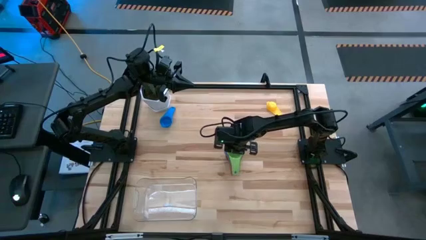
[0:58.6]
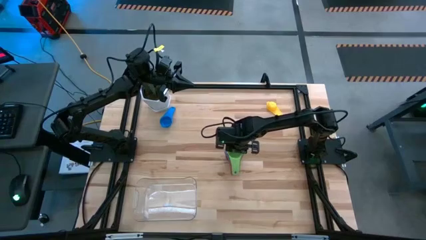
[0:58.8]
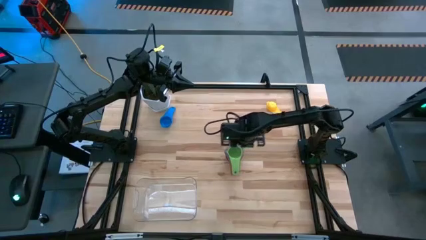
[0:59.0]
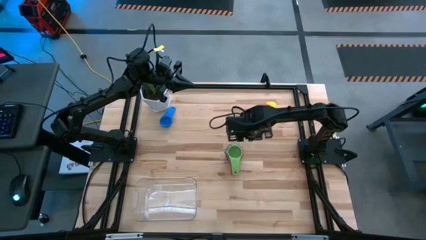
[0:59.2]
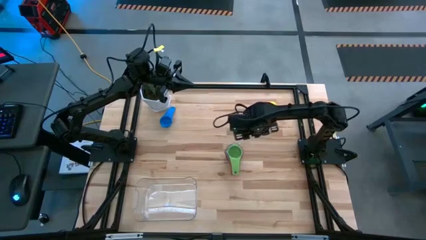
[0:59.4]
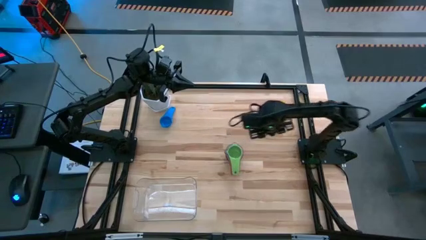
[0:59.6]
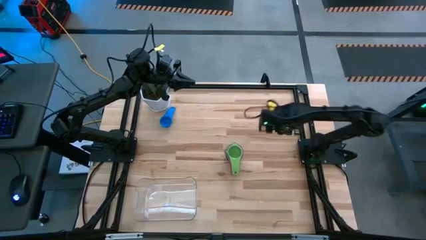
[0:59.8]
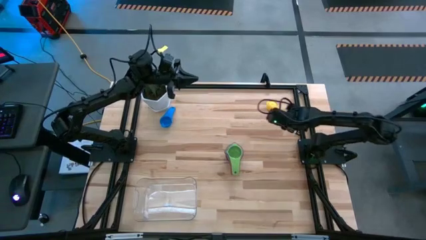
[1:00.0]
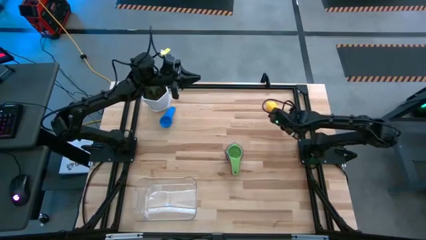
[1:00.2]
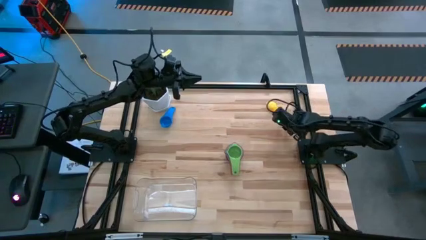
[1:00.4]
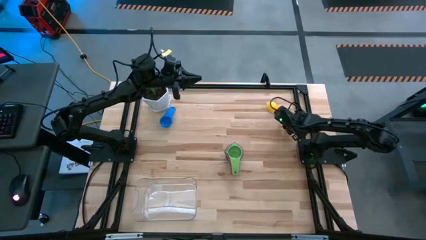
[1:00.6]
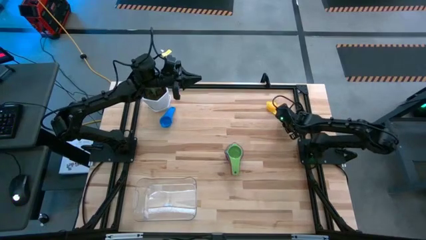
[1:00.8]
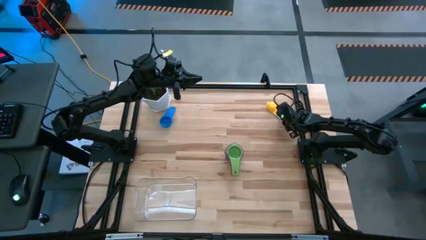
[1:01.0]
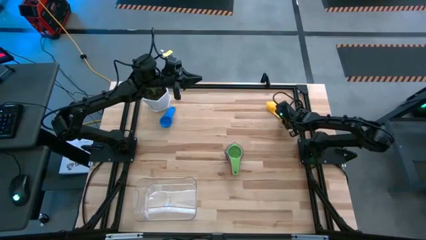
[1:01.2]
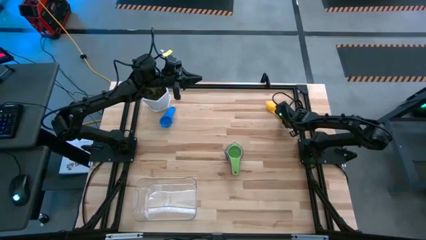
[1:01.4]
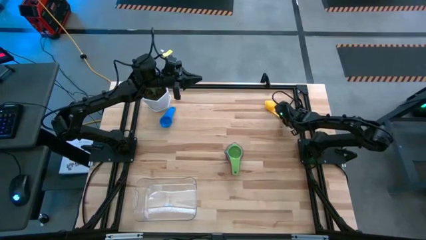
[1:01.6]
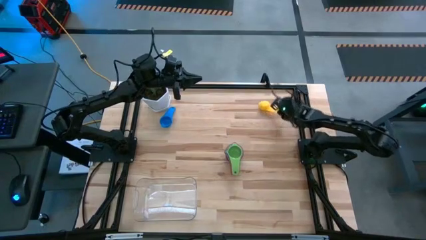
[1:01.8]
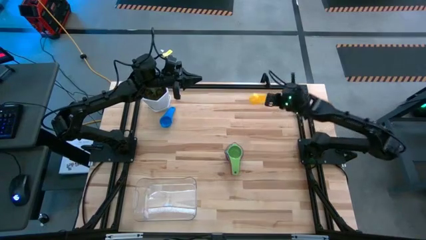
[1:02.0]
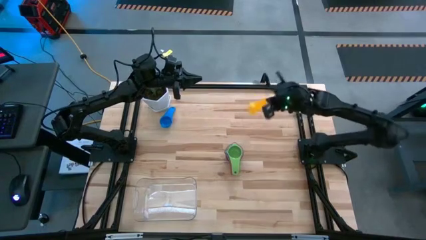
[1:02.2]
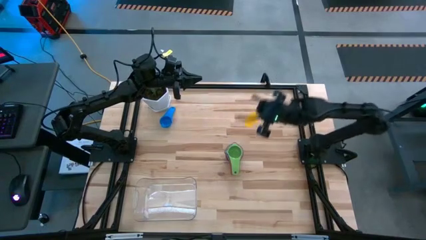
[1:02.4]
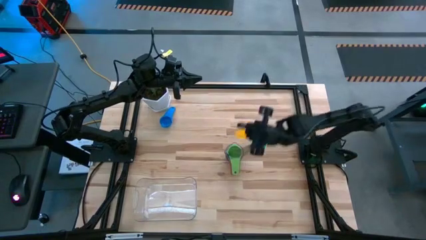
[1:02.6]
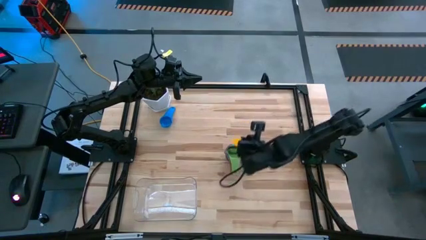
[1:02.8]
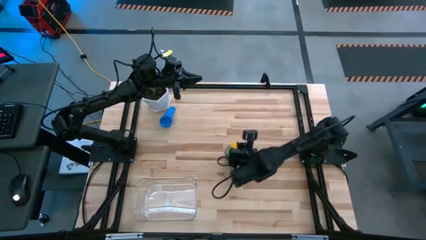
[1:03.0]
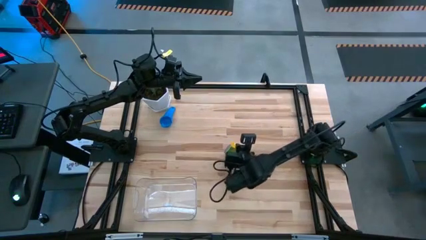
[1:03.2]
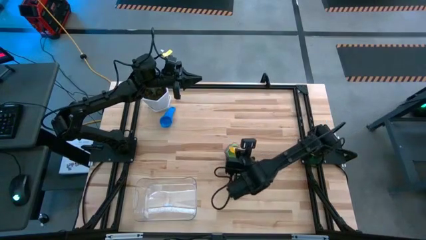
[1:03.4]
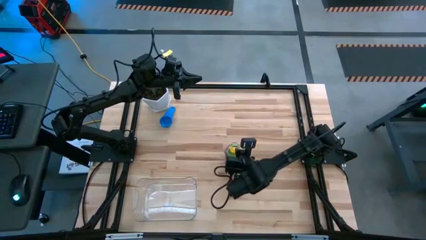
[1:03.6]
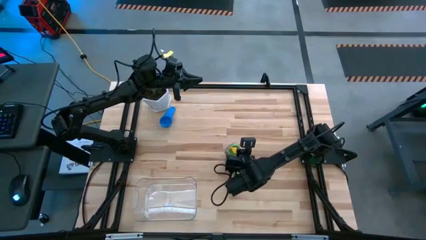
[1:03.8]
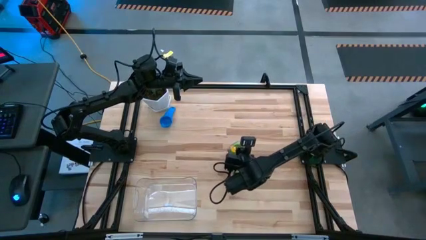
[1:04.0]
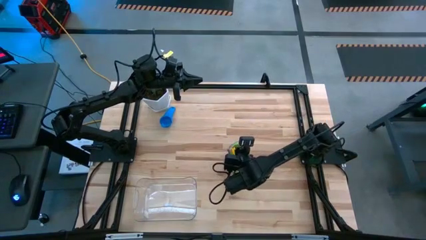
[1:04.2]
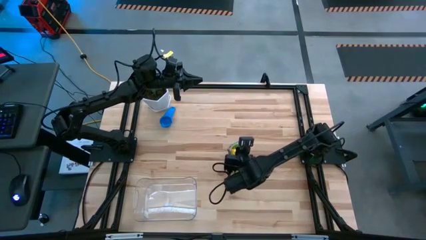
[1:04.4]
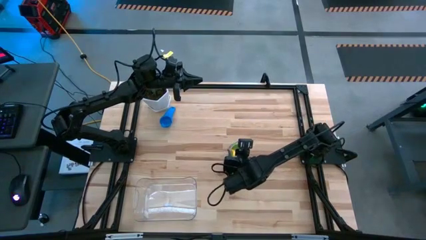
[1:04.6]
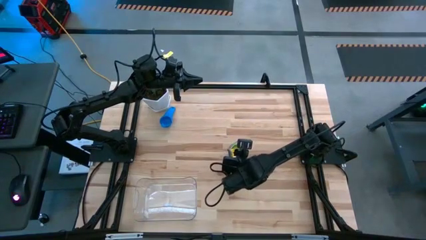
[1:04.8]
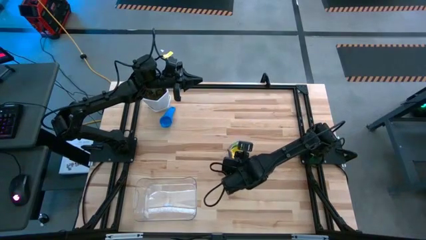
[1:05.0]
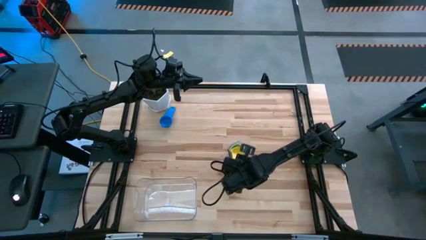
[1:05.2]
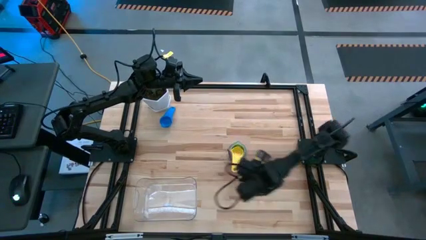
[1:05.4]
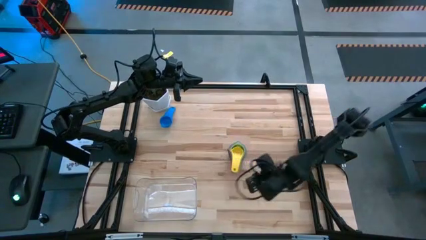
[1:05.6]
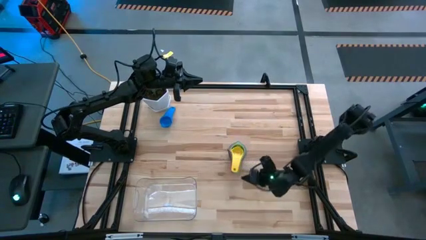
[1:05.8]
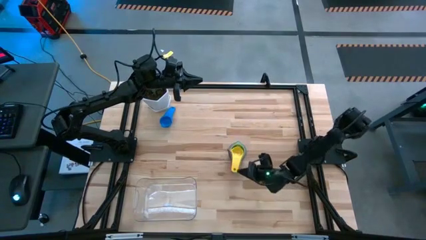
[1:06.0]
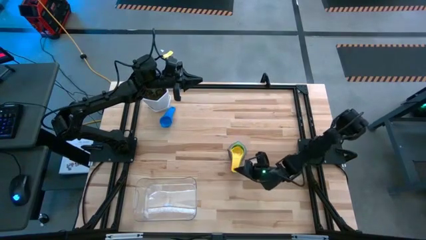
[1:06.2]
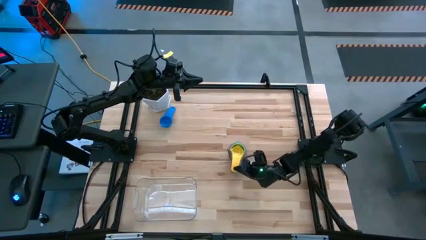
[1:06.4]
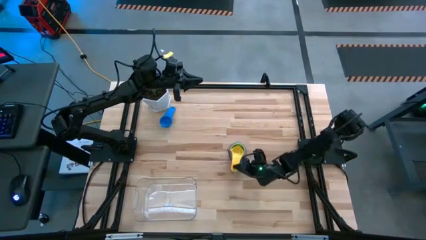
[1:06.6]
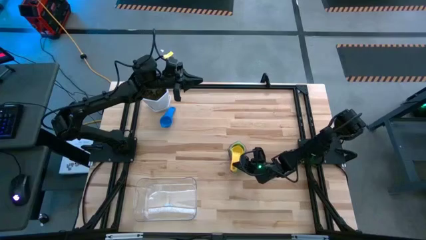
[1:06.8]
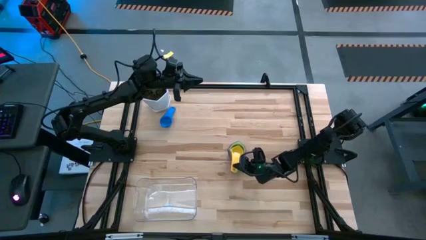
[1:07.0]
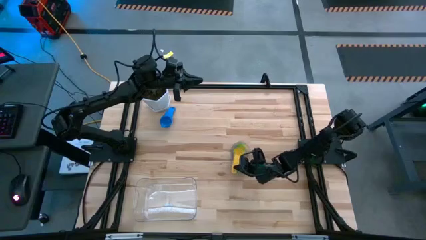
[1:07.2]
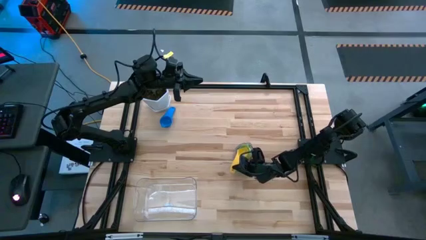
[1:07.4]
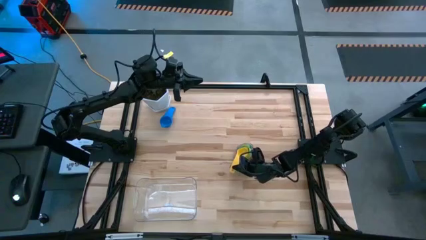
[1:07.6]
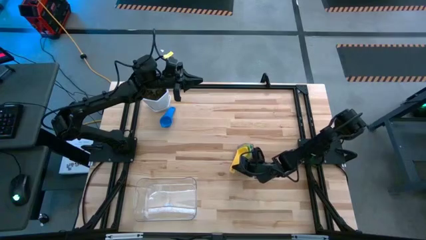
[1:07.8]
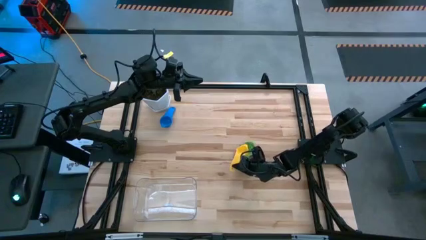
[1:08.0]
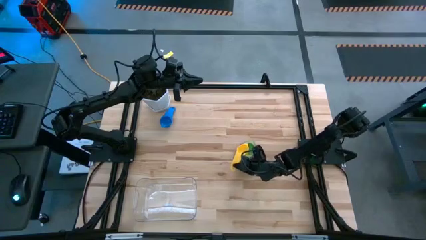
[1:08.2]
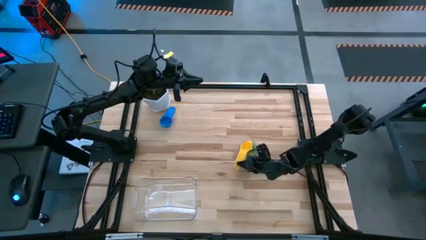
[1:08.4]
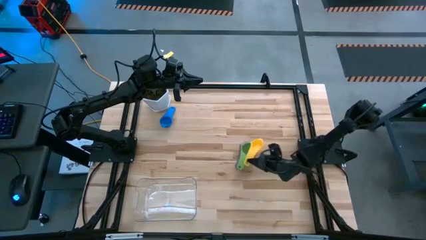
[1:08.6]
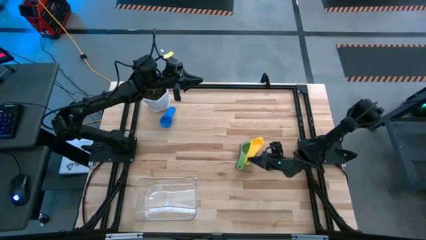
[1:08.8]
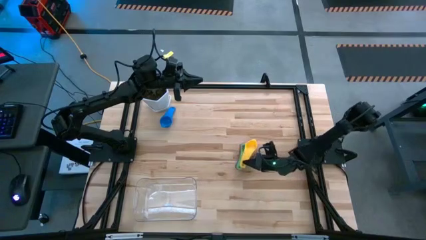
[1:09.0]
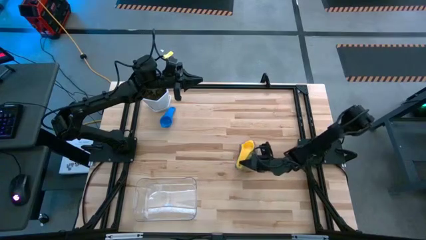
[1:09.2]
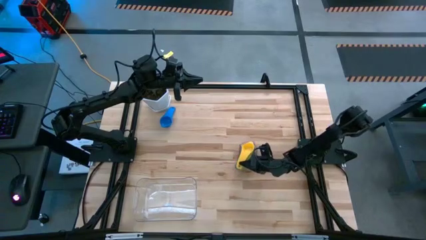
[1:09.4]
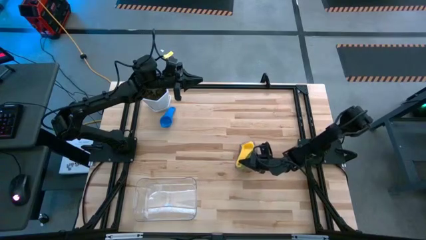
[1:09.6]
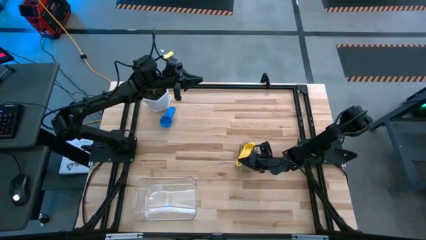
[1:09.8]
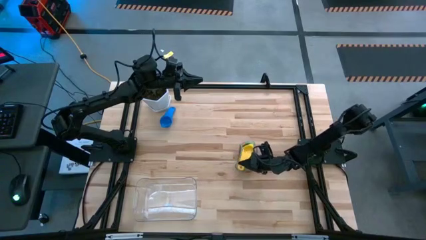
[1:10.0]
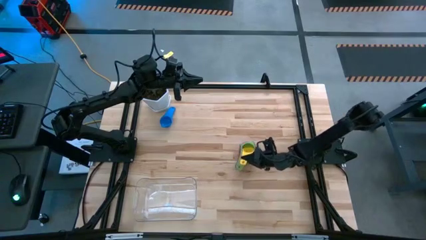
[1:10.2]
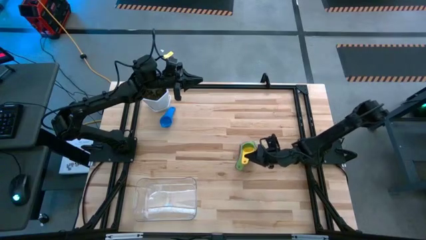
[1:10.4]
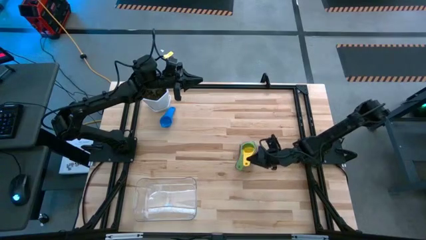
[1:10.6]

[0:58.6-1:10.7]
Task: Nest measuring cups in basket
Stack the yellow measuring cup on top of the green measuring cup

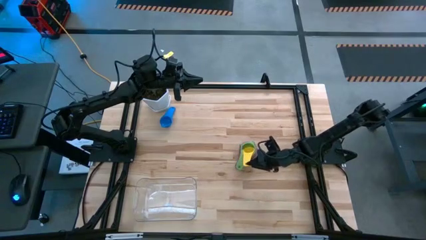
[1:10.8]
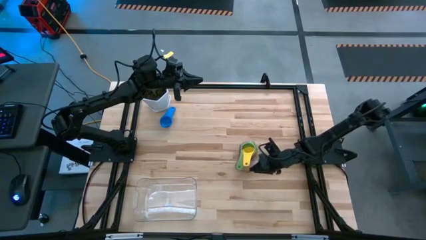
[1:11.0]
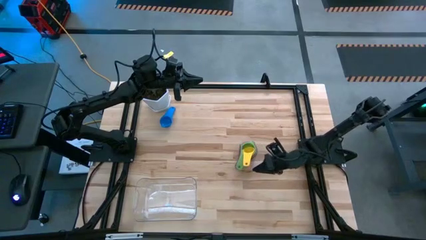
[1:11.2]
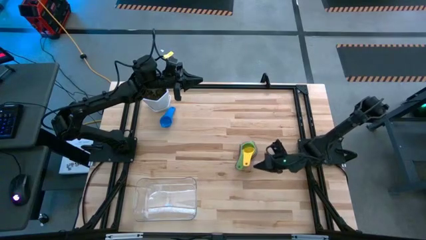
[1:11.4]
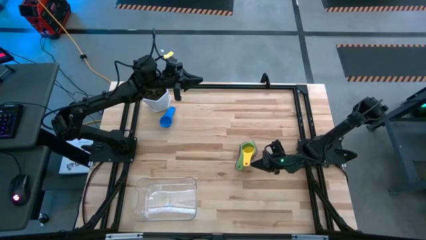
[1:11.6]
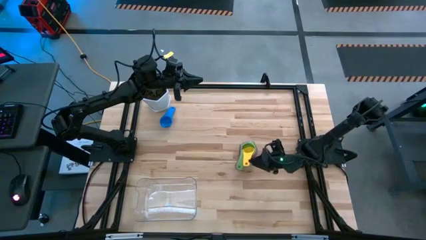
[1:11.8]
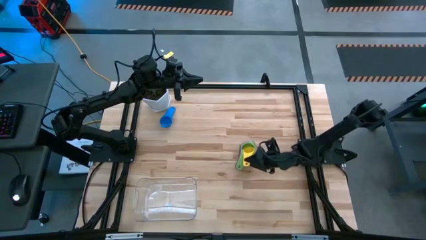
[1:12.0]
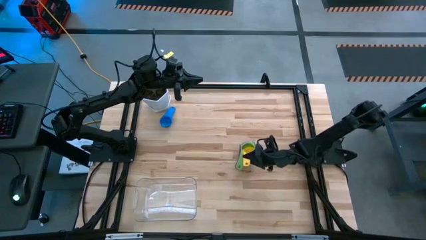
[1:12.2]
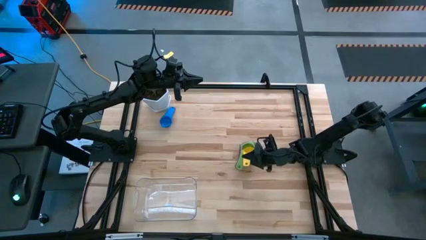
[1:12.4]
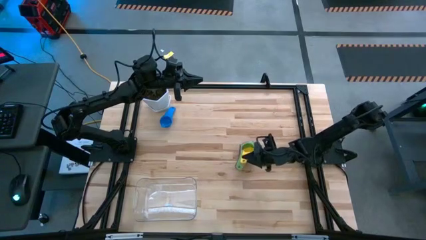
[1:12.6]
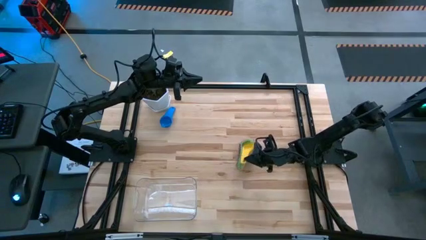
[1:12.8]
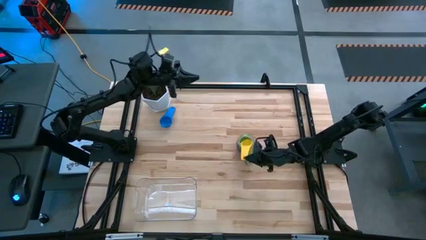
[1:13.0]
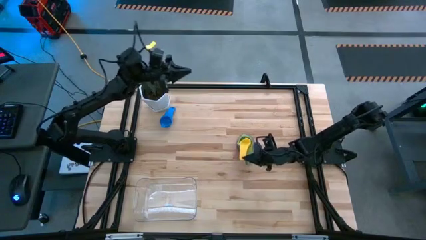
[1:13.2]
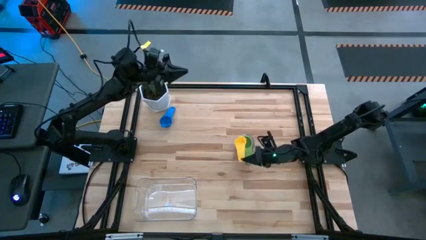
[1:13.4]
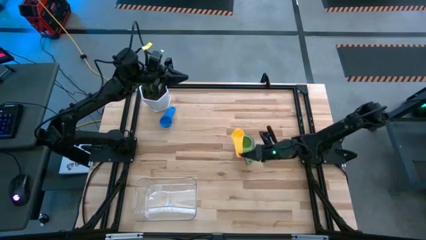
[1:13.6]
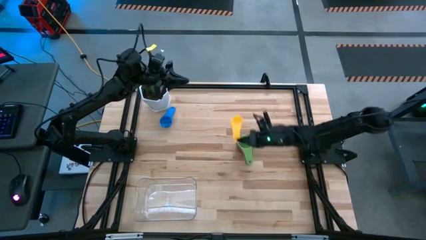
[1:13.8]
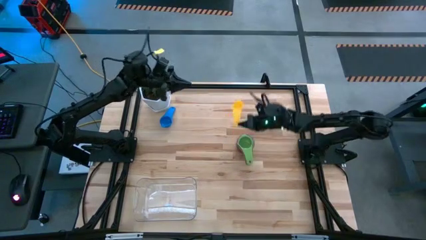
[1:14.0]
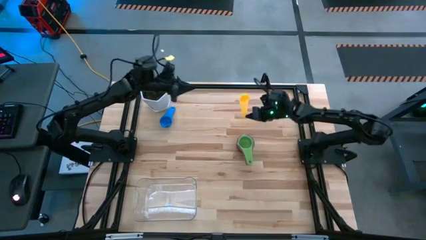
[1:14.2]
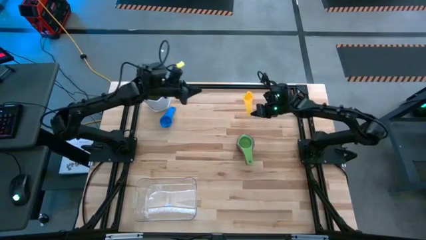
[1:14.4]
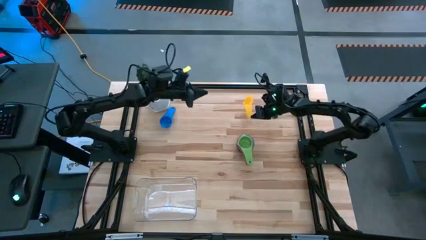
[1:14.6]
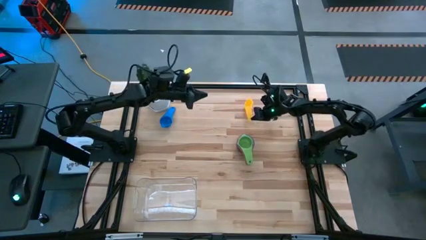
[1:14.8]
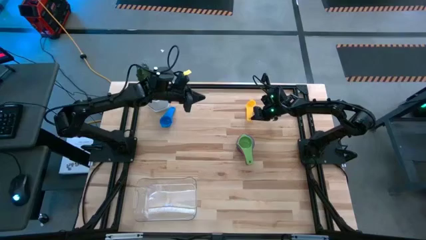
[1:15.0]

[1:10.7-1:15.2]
Remove the yellow measuring cup from the top of green measuring cup
